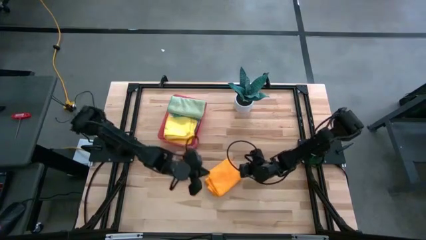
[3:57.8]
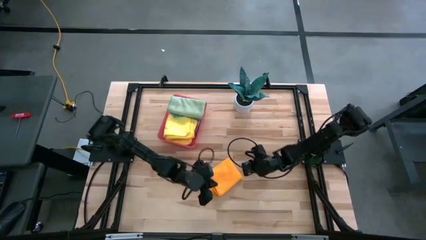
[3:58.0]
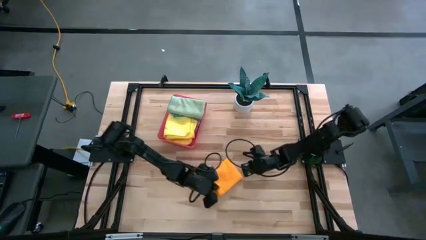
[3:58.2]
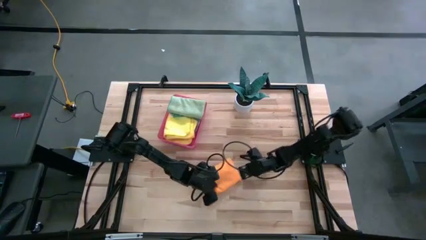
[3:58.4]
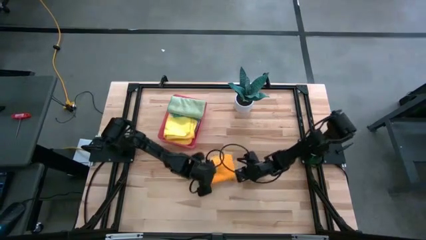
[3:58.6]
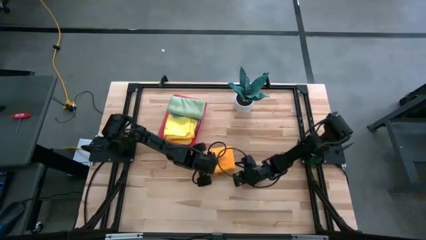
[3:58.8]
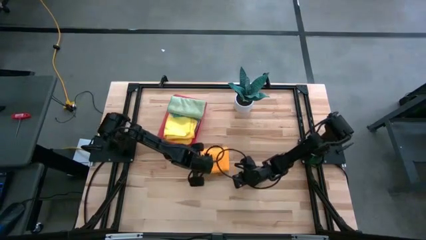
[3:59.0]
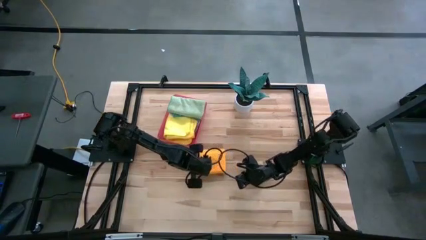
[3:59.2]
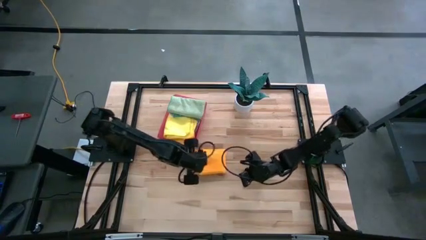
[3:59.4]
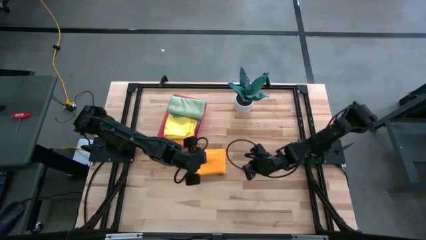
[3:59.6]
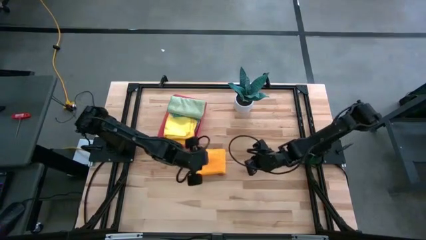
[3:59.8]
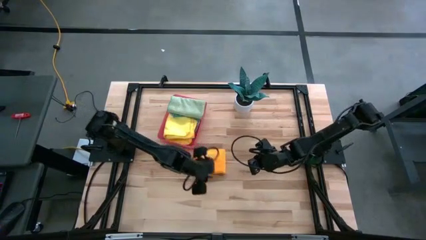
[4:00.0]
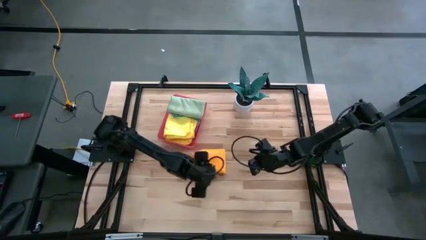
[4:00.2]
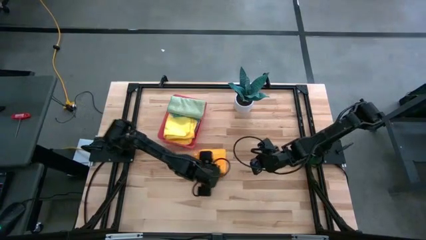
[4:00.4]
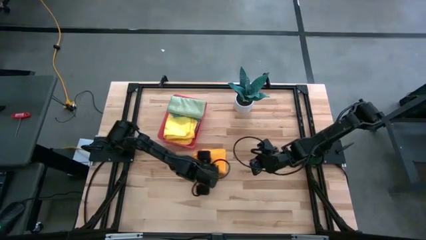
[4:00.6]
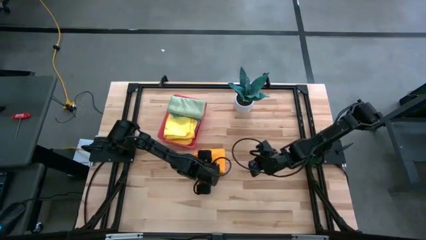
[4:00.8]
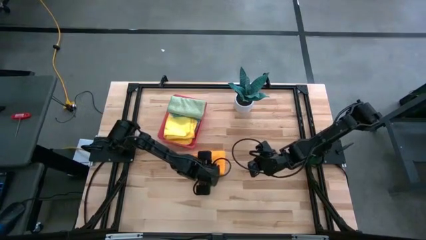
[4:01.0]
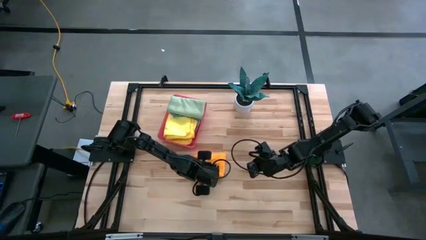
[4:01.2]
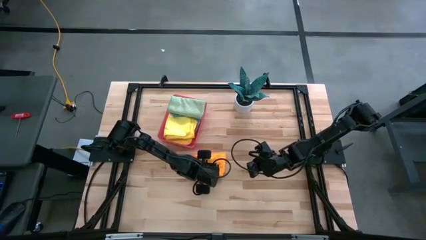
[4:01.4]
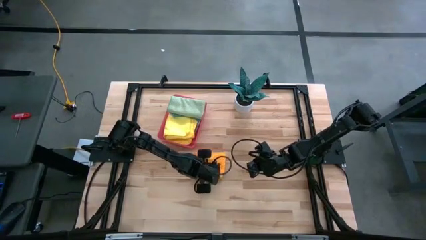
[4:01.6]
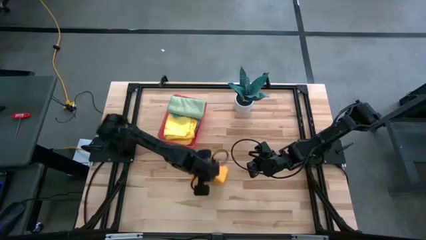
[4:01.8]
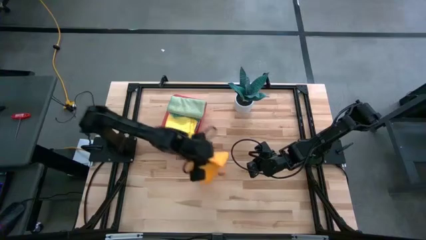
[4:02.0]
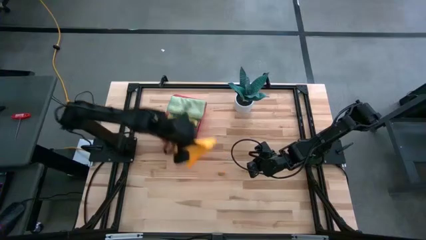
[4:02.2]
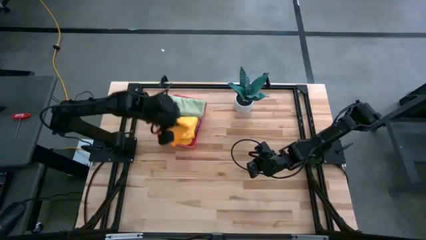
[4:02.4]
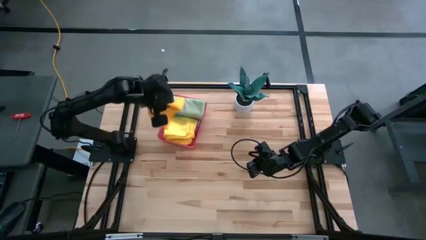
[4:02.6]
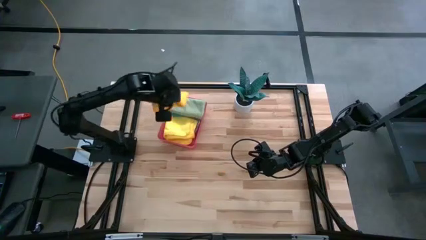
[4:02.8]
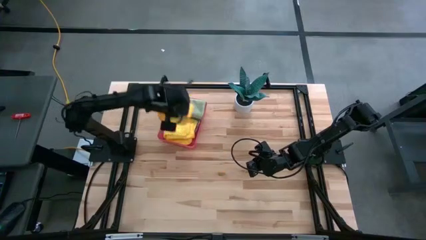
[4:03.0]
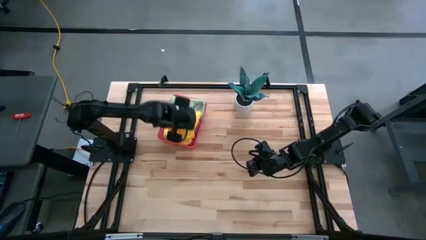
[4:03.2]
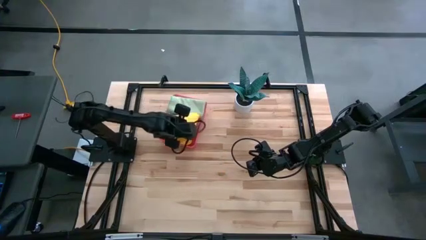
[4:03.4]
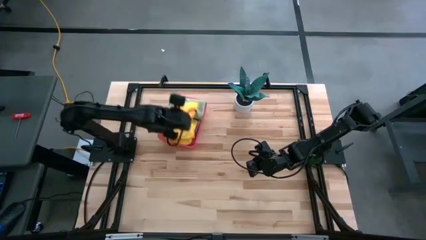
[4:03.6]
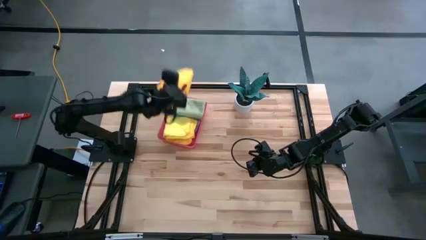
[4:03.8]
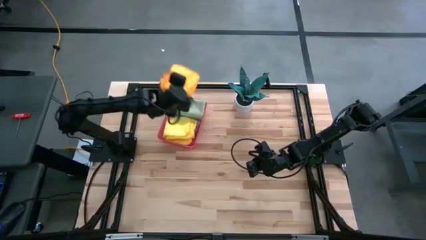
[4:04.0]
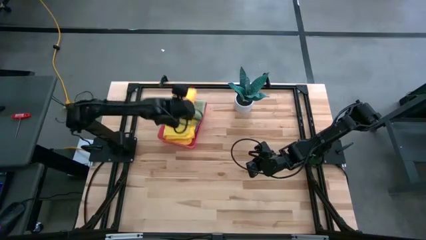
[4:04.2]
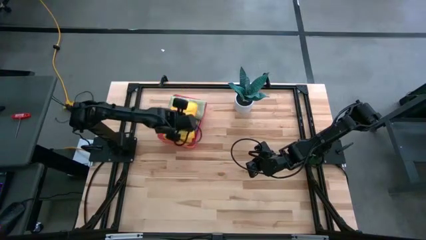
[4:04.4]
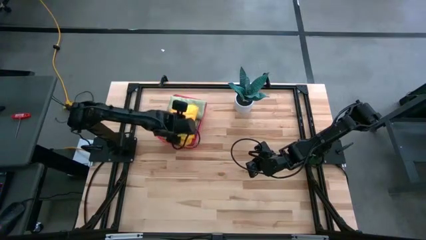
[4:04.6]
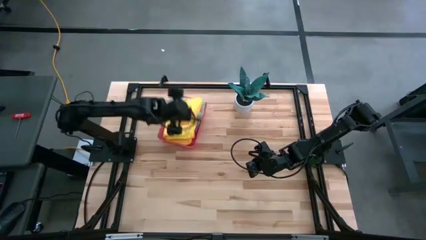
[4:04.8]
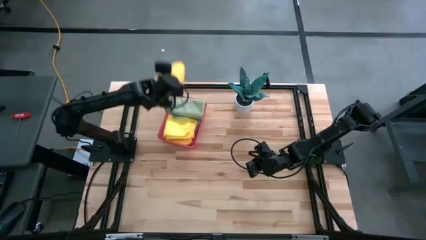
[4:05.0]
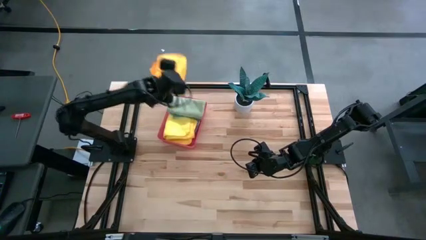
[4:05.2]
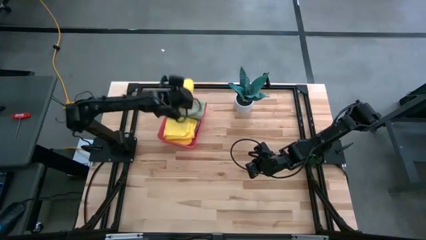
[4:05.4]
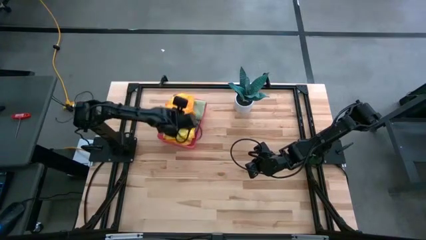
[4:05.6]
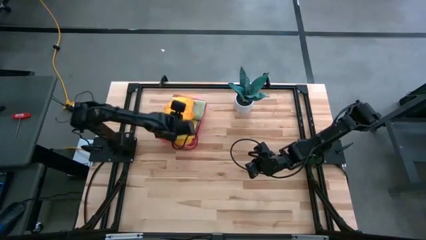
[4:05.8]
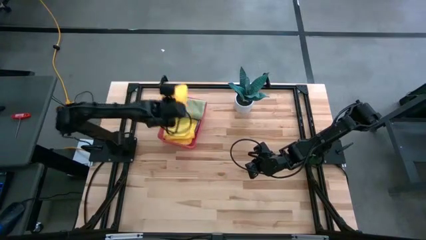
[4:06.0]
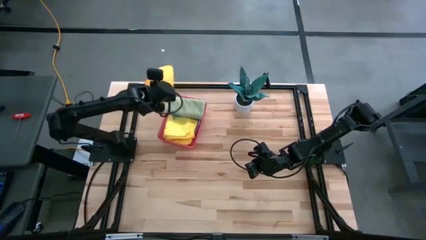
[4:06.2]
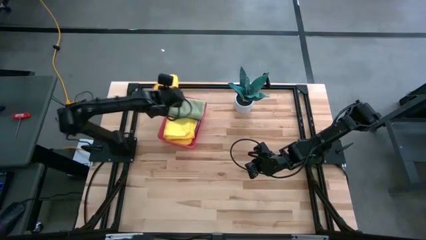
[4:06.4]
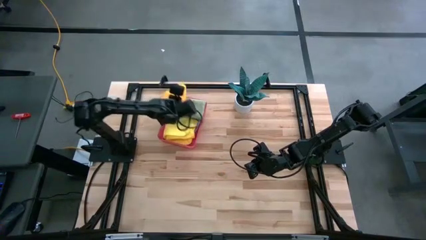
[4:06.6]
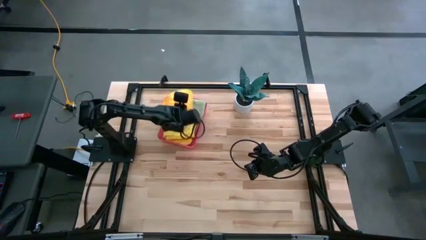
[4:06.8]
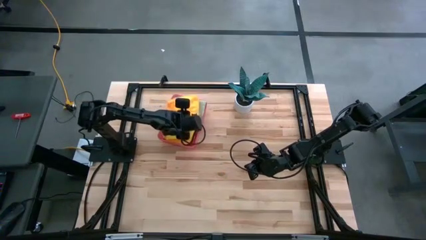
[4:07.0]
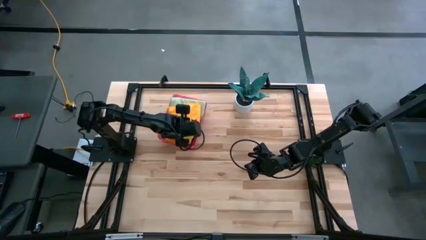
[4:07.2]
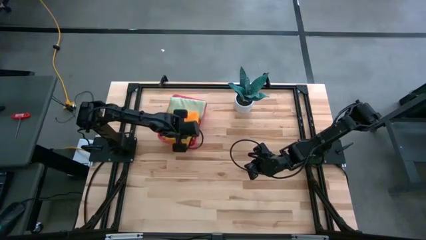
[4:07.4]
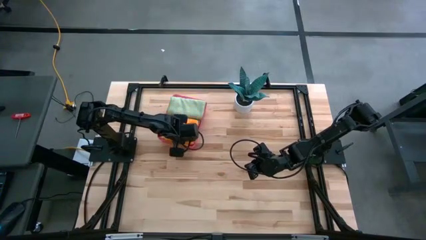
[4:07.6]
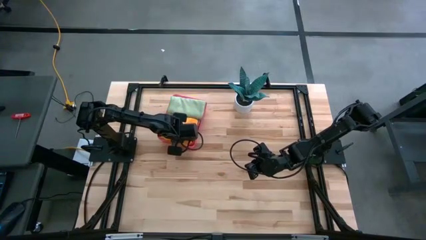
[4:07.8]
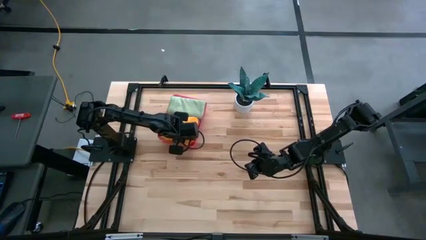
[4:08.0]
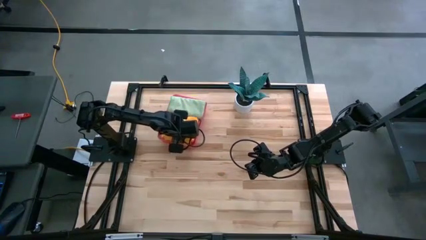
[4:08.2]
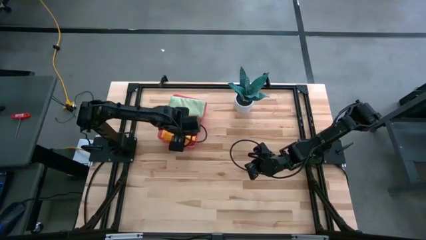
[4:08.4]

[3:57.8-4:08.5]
Task: Fold microfiber towels
Put the folded orange microfiber towel into the pink bin

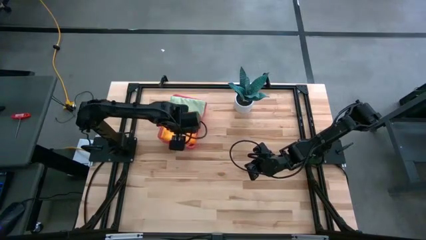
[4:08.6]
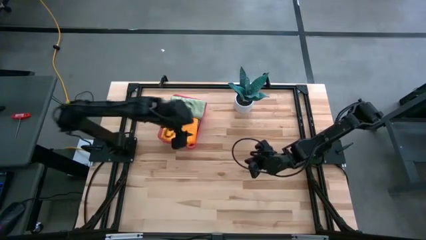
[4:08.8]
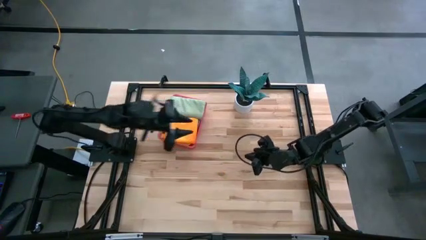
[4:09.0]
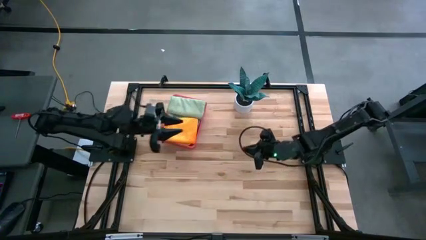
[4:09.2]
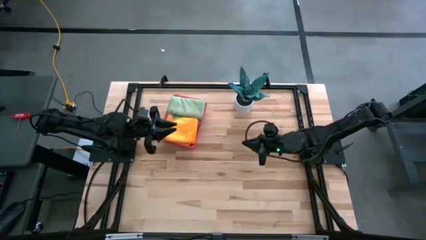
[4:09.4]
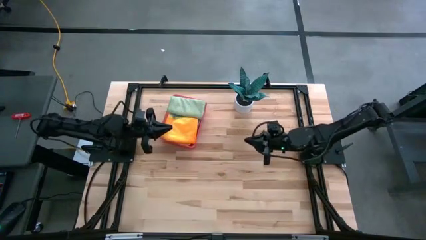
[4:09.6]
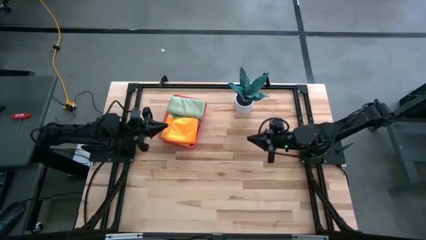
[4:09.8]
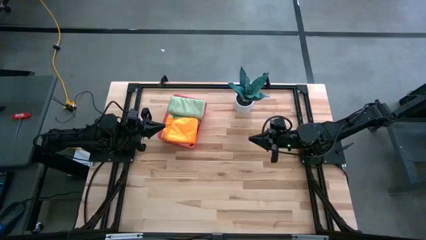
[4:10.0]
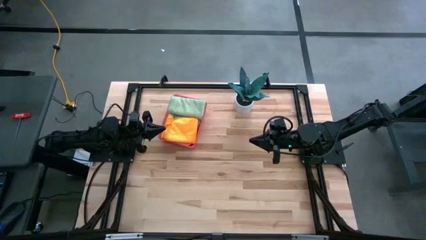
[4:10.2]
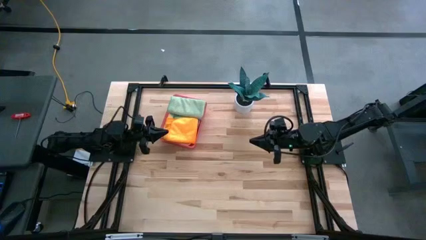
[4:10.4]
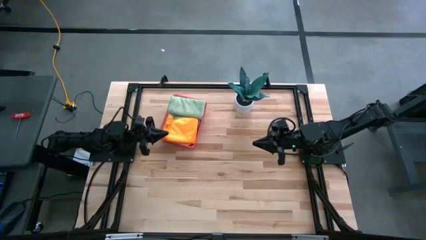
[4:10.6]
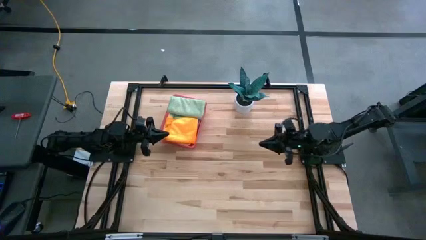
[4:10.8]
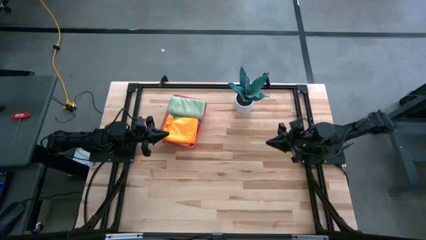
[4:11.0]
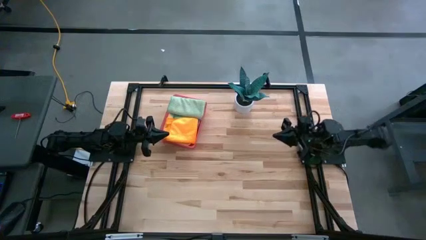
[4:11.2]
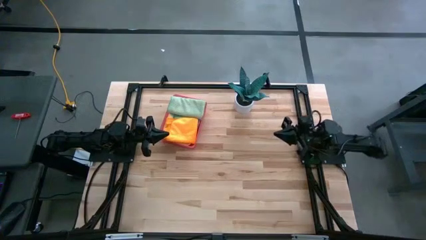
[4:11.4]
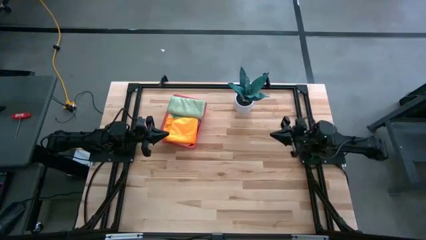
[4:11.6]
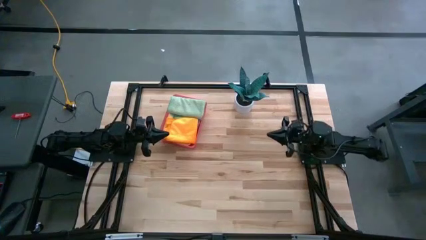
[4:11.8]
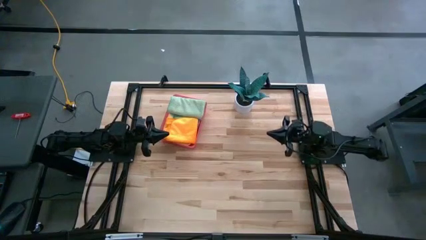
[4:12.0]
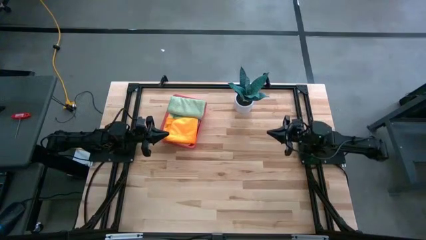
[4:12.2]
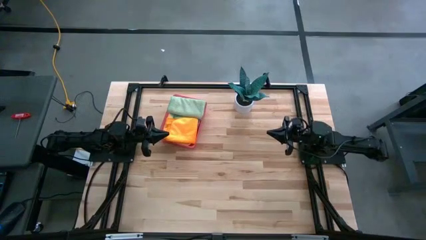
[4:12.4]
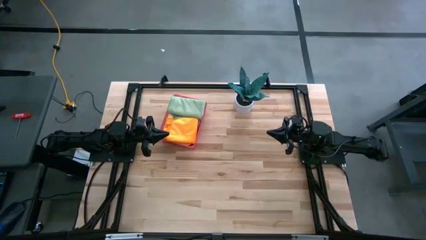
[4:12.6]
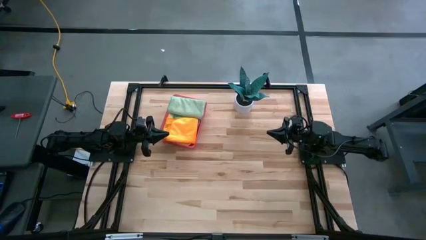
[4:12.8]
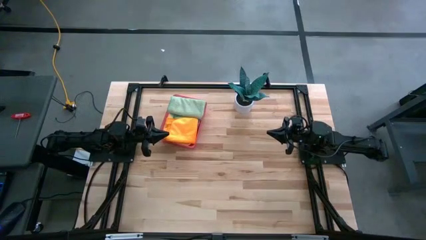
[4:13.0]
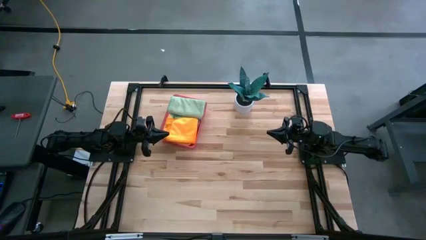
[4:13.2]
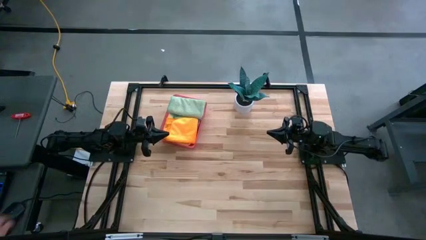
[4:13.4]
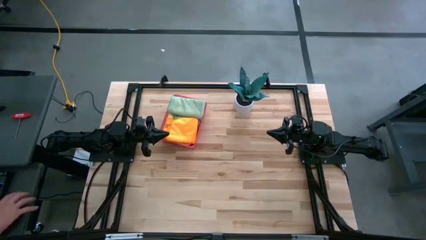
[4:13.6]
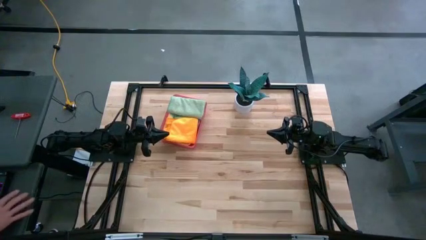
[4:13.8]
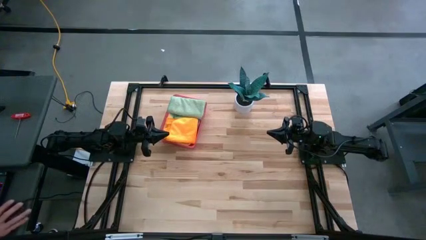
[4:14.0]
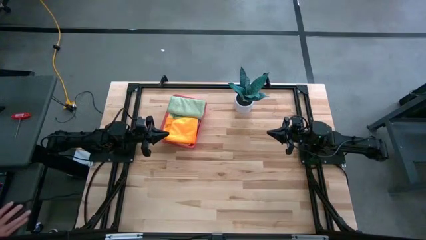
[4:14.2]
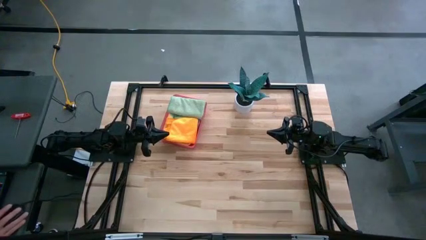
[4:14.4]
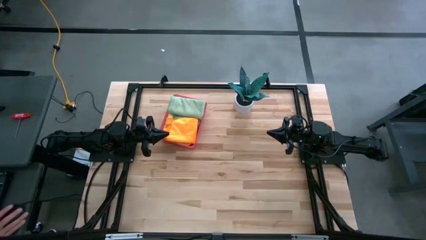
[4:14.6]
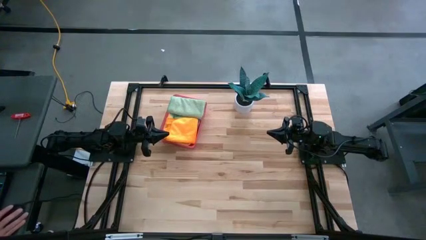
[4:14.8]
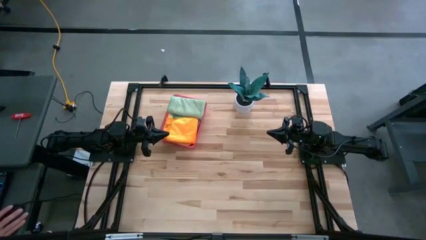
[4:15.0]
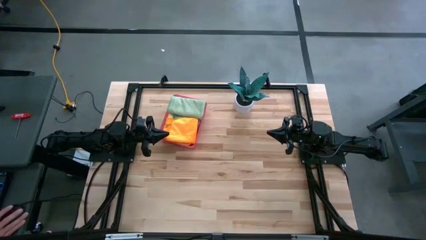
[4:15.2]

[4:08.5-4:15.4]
Return to Home Position
